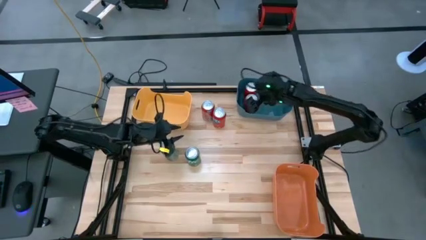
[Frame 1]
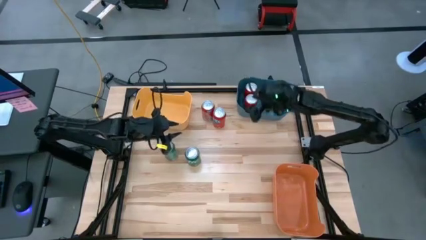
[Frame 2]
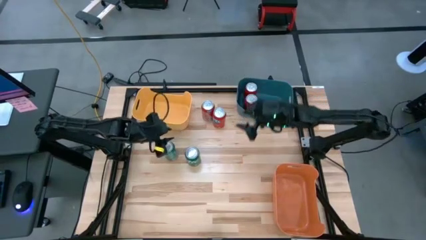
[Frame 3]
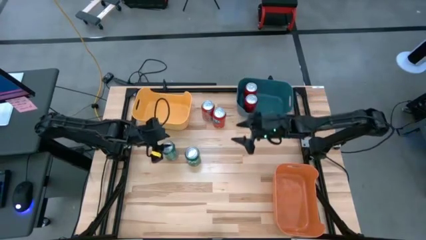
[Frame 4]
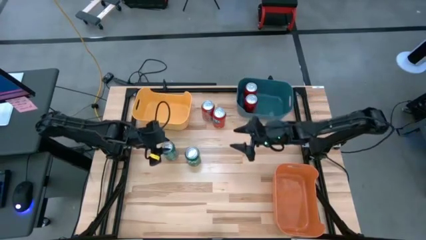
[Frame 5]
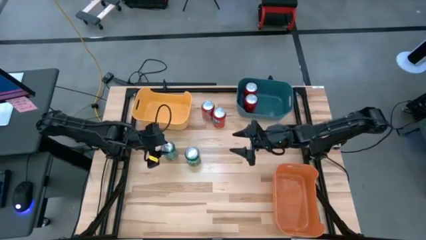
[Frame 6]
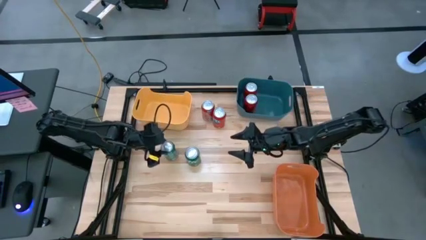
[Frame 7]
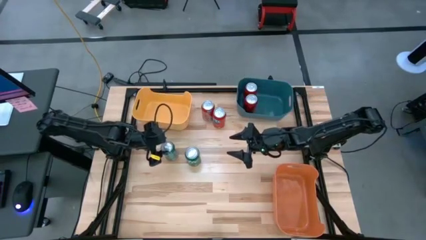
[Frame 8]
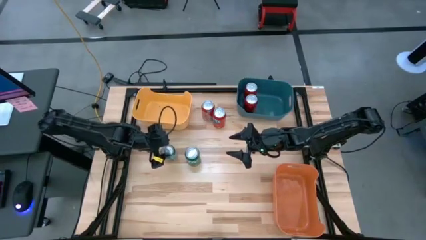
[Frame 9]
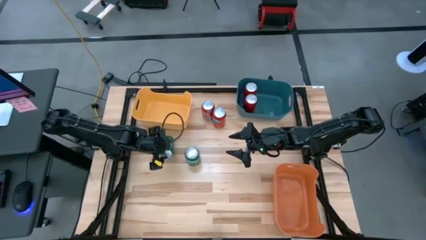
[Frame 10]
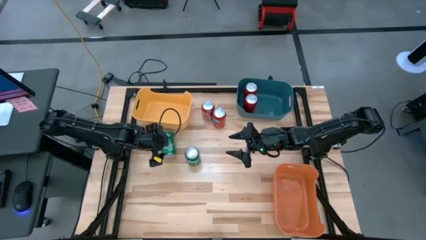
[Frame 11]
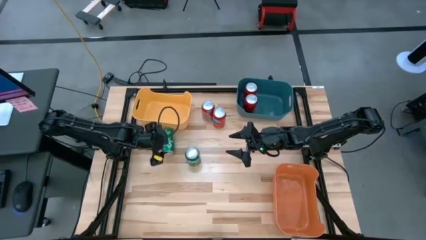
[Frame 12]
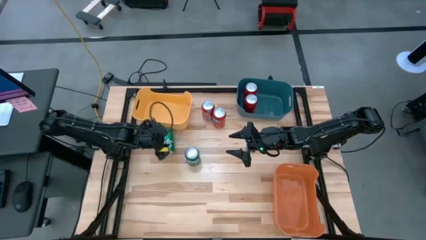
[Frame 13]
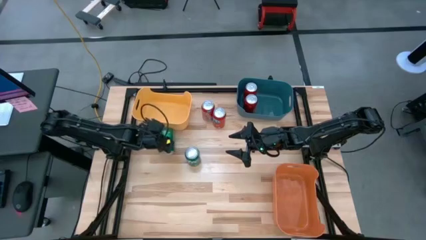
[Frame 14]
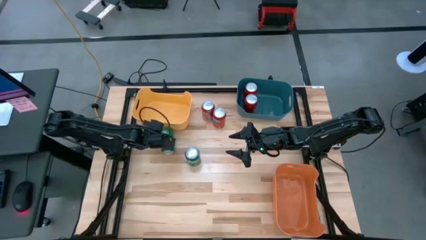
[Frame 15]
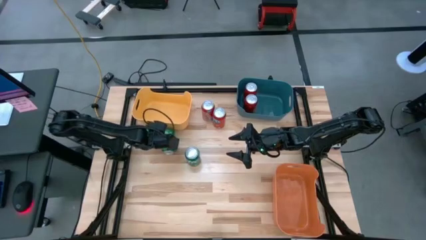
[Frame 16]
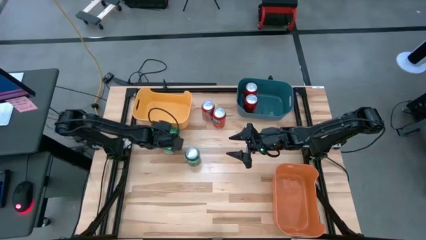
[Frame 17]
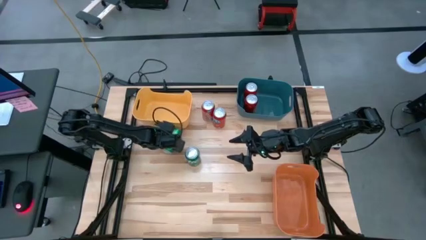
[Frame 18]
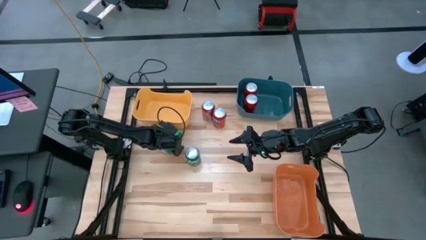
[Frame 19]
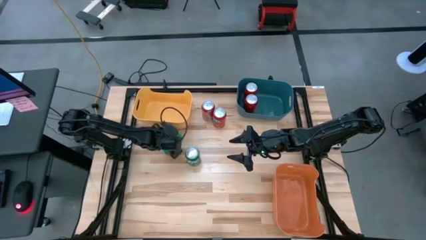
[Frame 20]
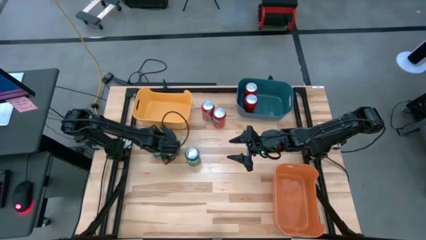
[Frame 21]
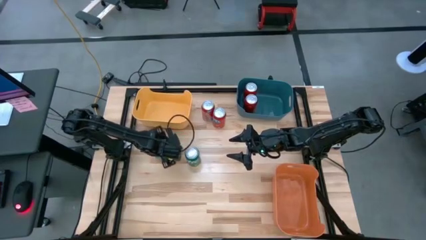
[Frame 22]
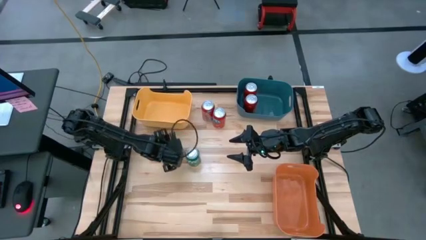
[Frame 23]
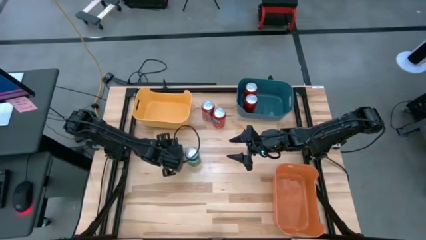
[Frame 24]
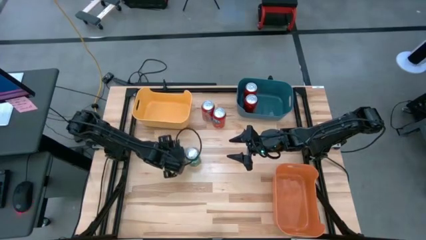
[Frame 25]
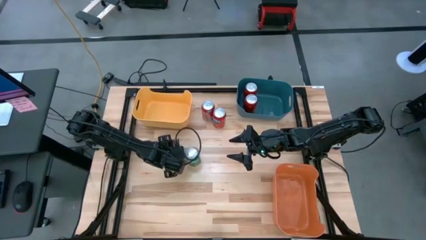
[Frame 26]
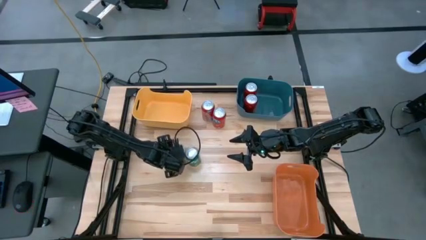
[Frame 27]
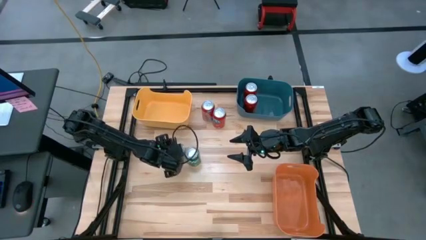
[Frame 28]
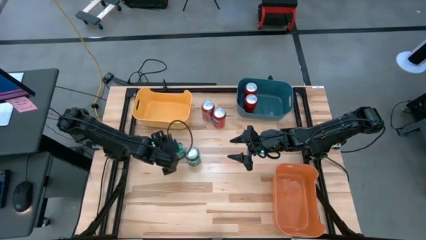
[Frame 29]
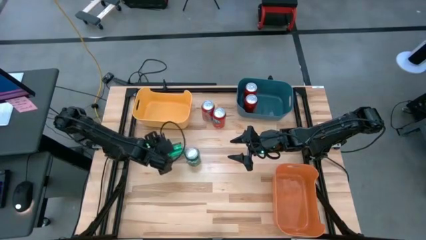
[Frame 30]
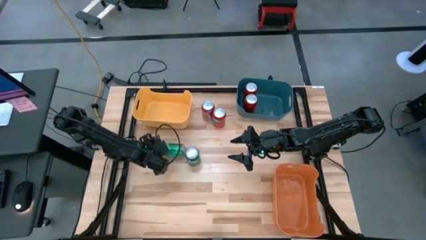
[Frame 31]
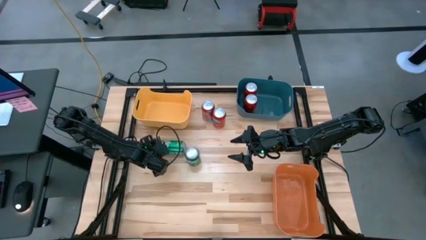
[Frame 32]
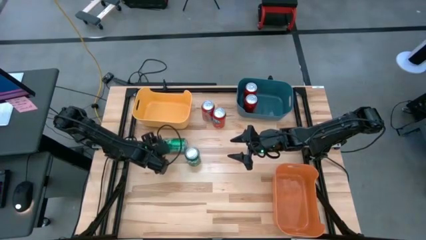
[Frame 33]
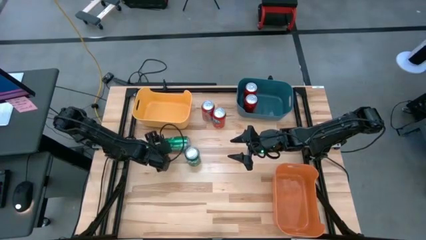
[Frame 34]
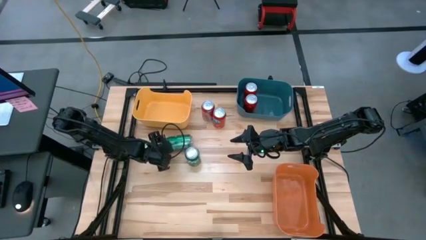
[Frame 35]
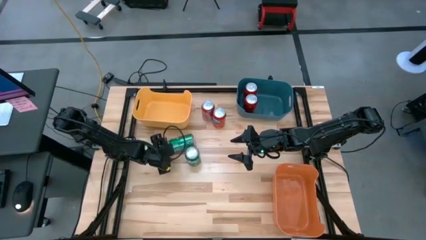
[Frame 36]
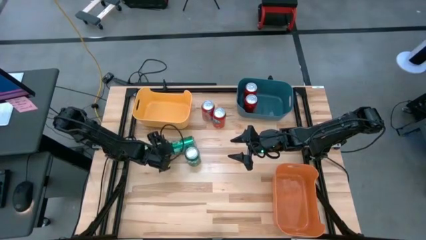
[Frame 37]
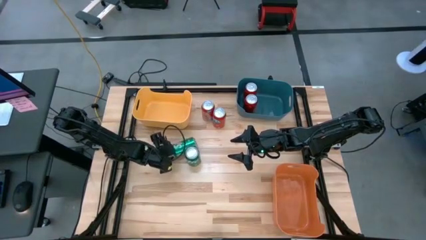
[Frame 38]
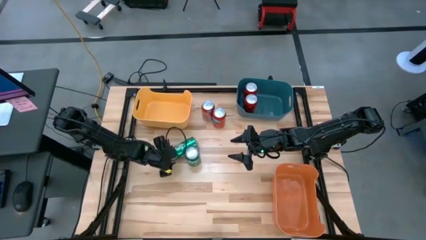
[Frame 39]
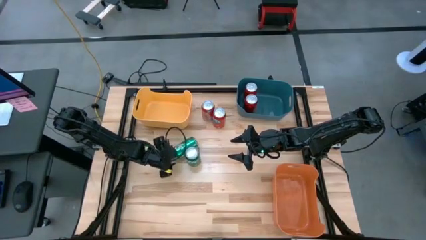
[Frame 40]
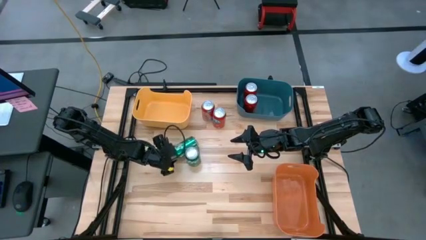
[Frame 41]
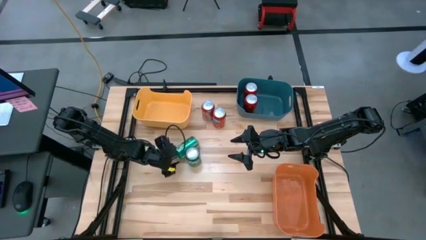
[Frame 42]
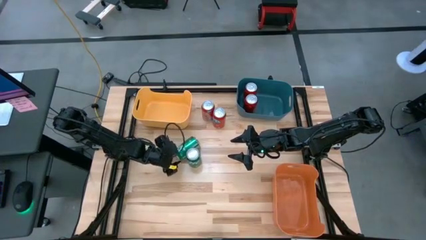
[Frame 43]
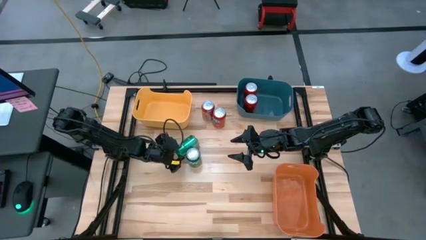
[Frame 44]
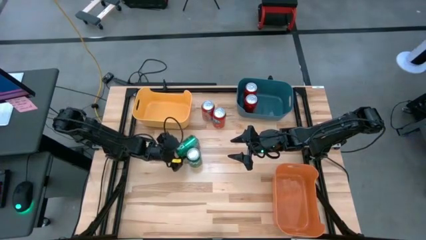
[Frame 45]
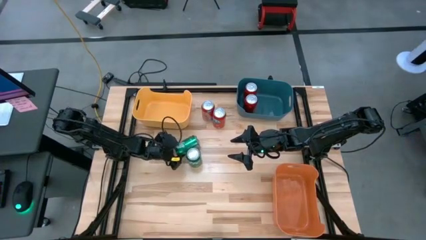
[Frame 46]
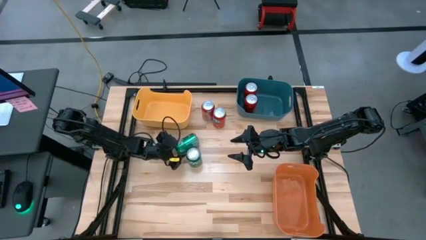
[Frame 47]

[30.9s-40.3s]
Task: Sort soda cans
Put the left green soda can into the yellow bin

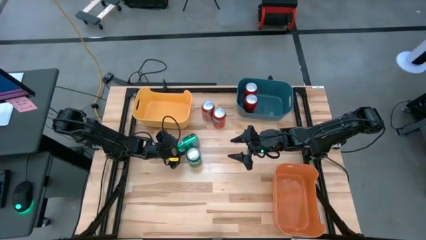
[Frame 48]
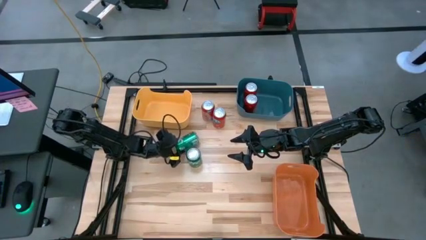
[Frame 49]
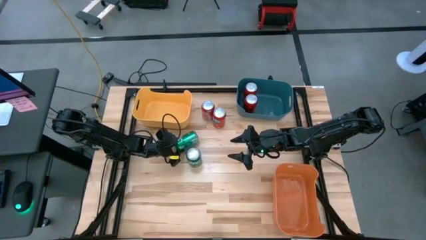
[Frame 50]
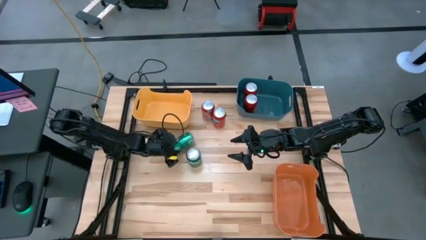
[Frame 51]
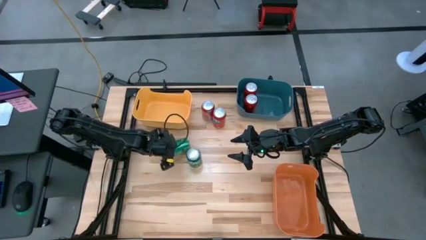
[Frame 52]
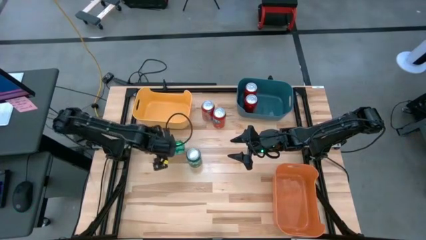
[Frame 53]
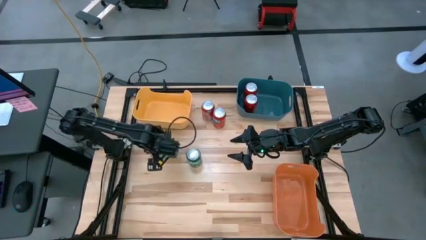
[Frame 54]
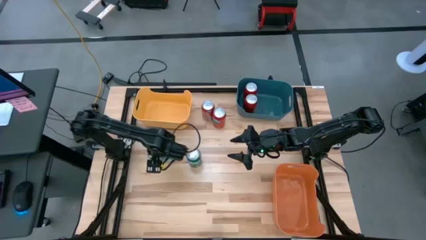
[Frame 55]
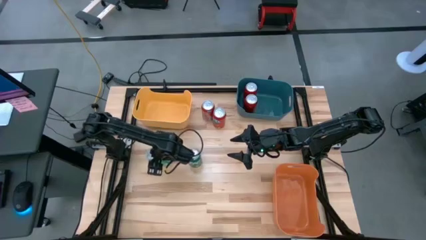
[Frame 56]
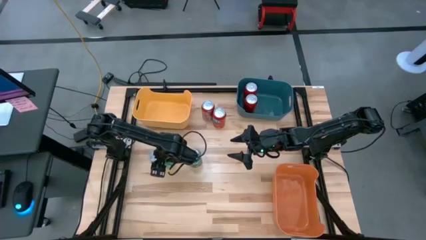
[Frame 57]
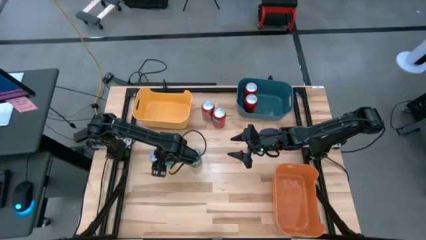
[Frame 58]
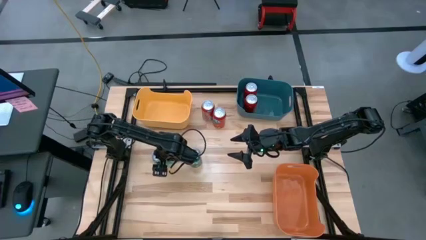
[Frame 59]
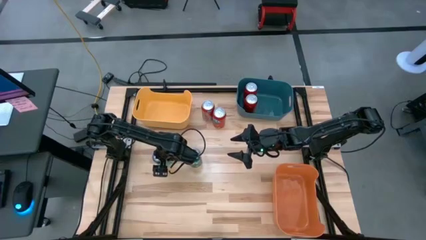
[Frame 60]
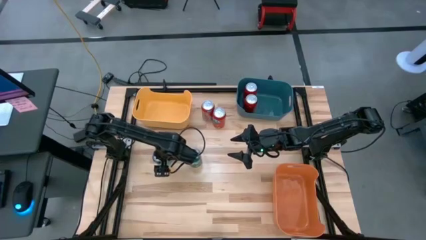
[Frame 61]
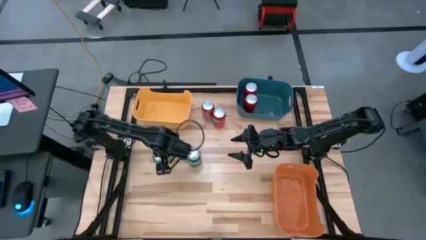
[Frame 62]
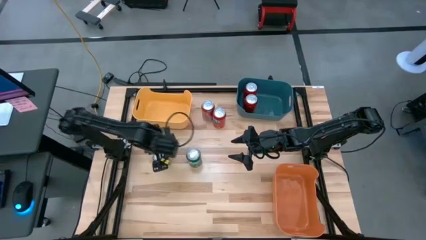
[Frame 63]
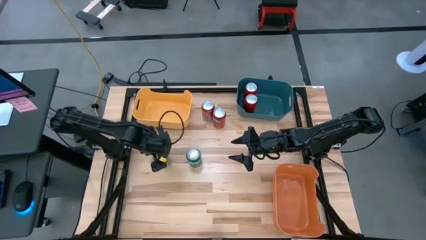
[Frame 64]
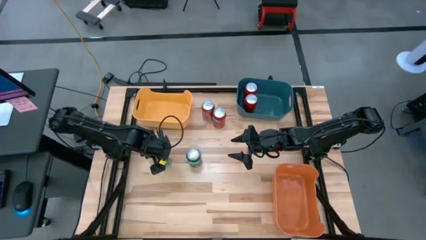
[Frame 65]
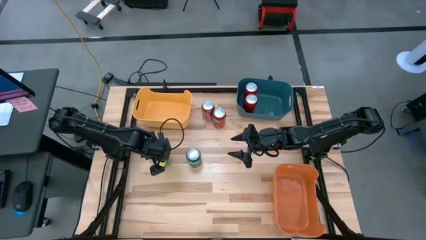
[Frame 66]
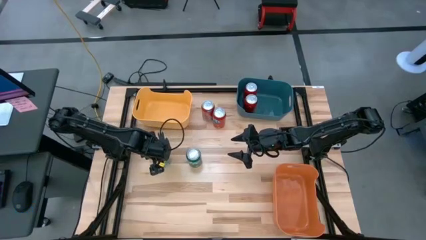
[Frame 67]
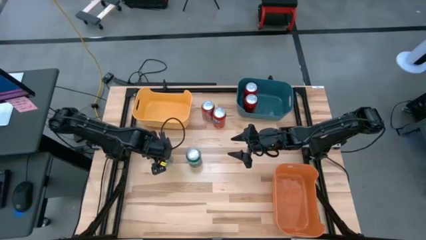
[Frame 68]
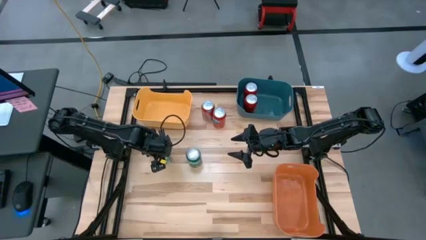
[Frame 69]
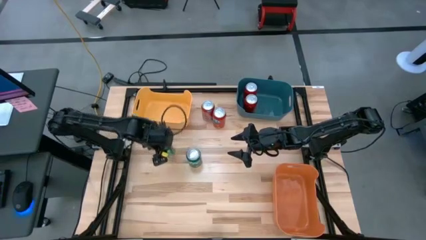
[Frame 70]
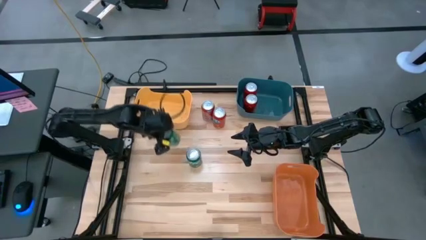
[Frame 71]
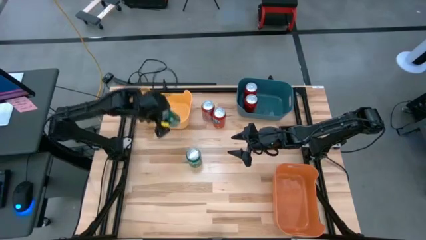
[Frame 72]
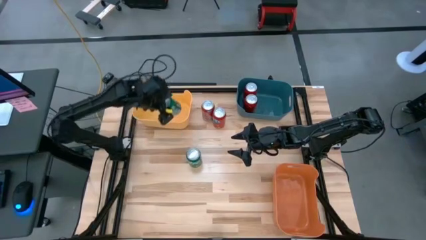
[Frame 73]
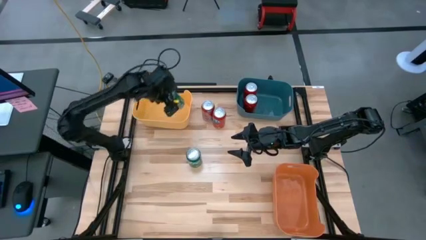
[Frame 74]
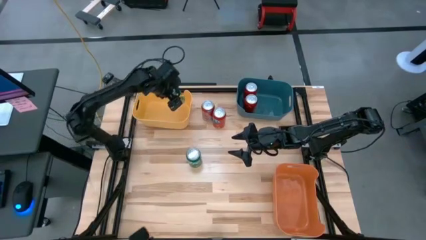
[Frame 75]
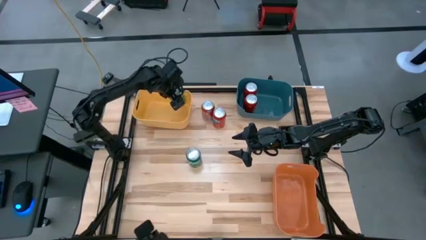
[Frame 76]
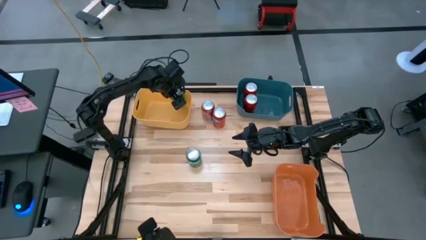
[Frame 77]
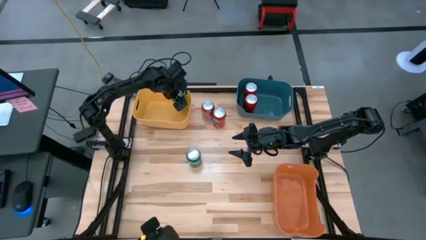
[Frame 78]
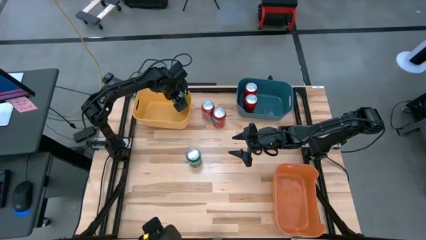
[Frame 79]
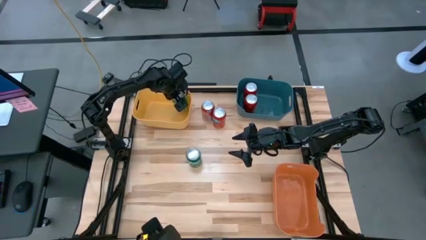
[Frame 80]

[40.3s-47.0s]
Put the left green soda can into the yellow bin
